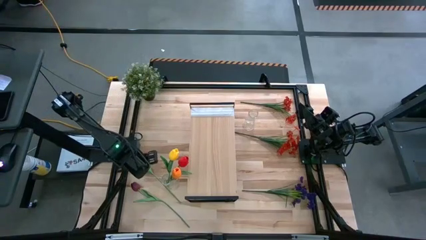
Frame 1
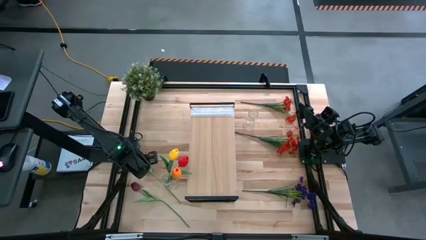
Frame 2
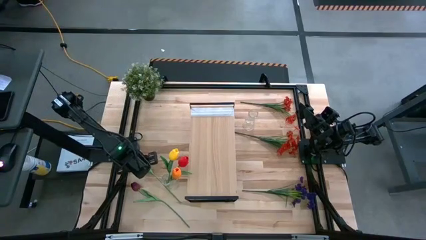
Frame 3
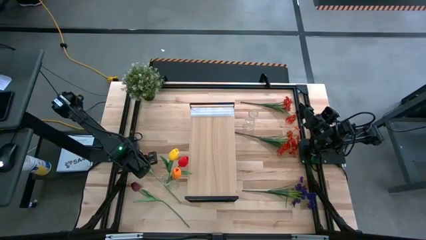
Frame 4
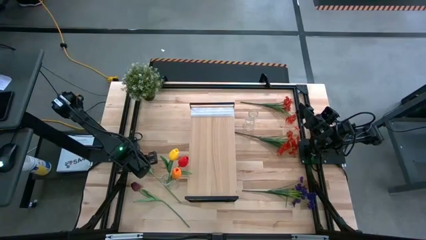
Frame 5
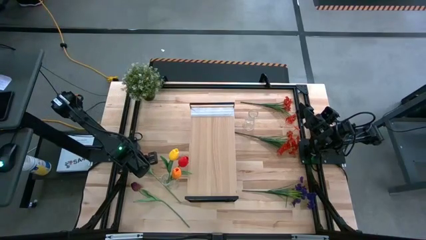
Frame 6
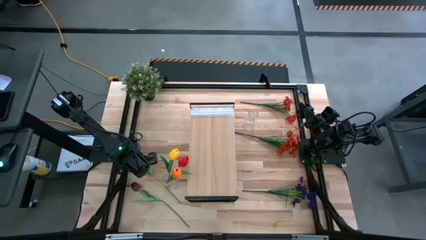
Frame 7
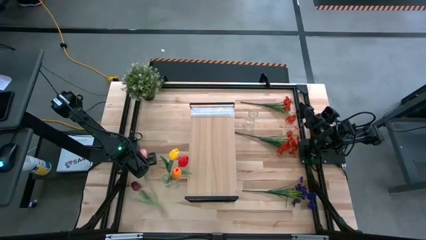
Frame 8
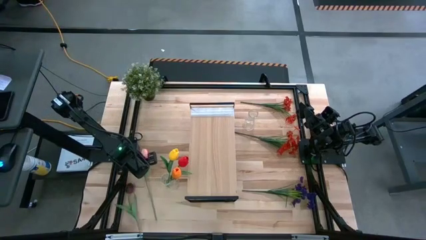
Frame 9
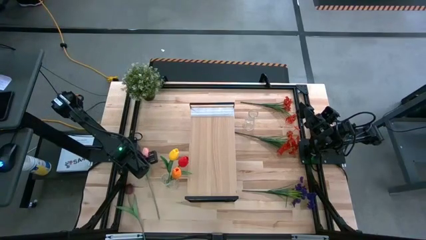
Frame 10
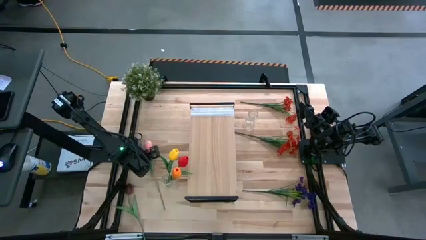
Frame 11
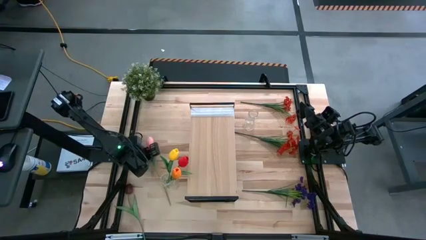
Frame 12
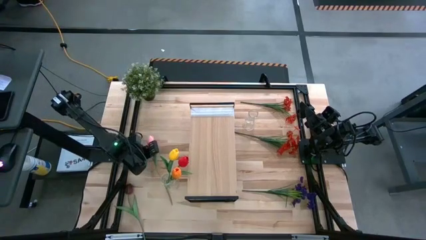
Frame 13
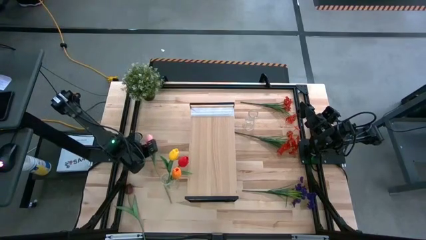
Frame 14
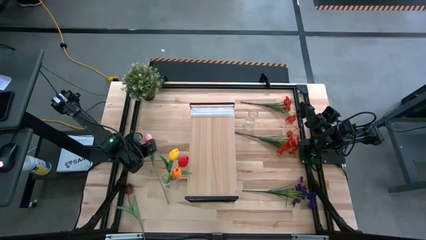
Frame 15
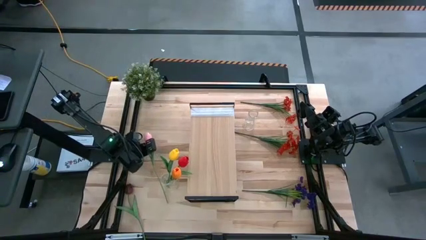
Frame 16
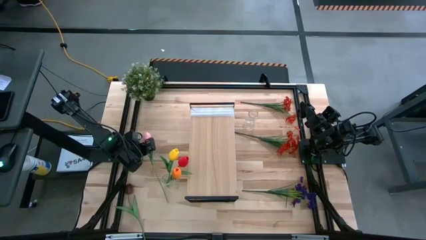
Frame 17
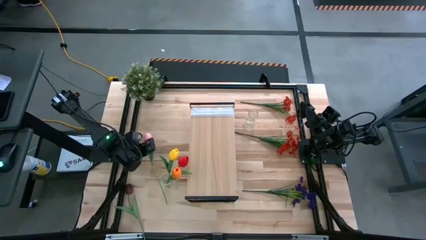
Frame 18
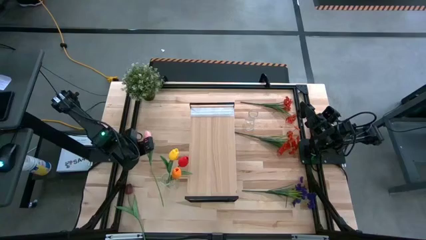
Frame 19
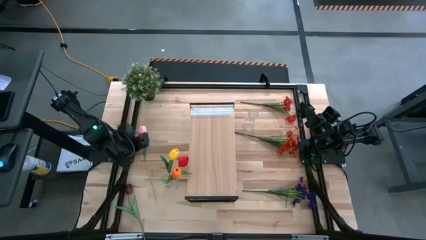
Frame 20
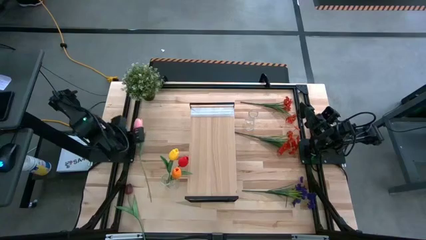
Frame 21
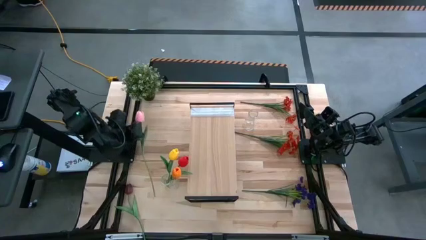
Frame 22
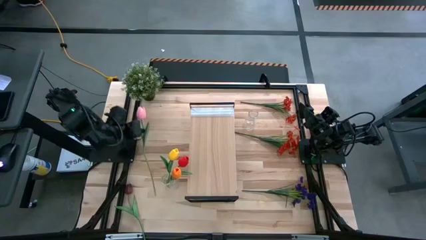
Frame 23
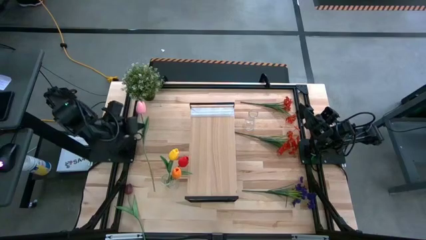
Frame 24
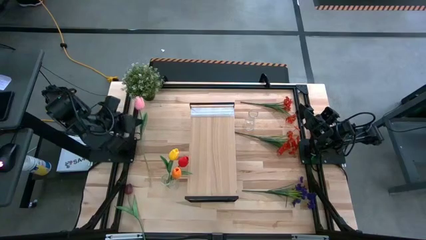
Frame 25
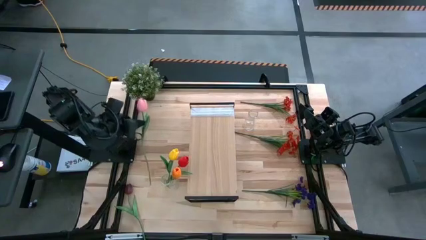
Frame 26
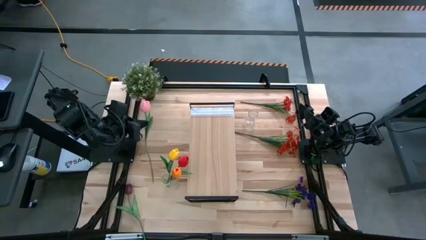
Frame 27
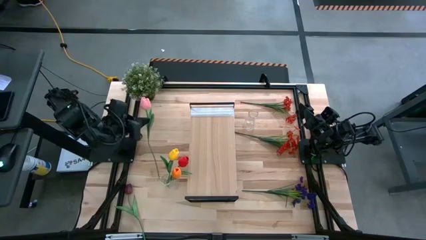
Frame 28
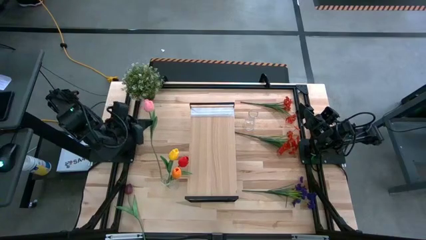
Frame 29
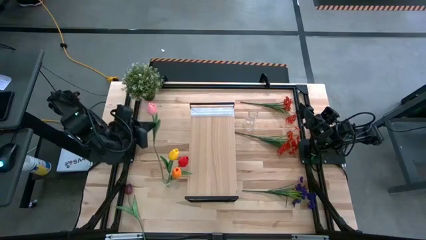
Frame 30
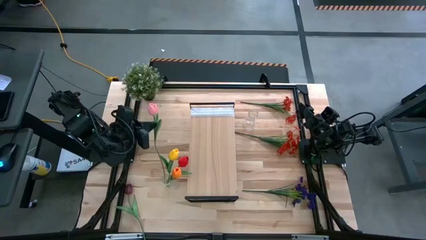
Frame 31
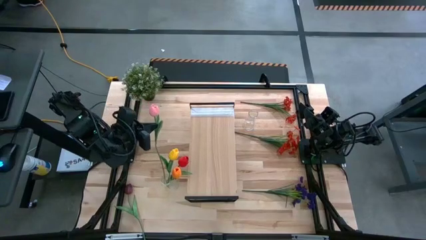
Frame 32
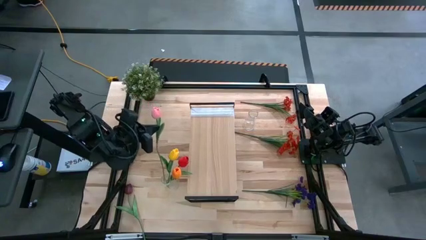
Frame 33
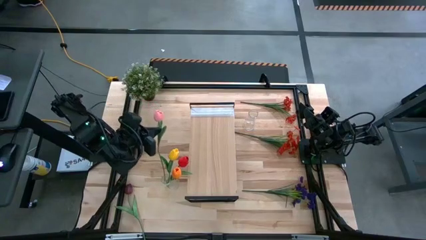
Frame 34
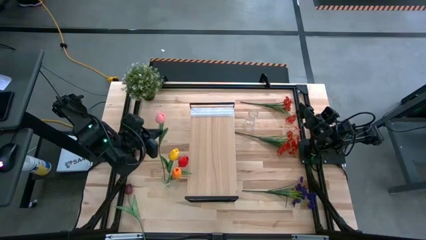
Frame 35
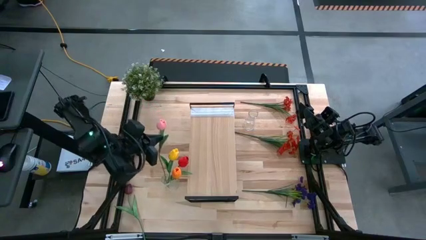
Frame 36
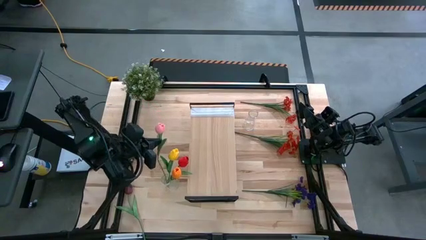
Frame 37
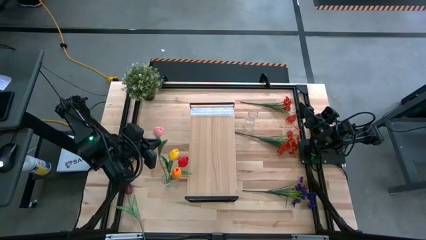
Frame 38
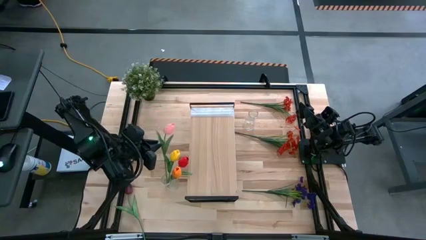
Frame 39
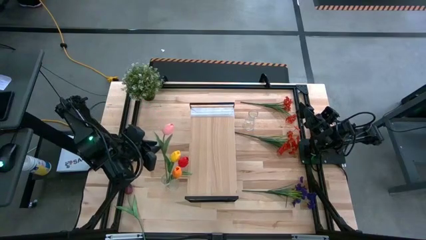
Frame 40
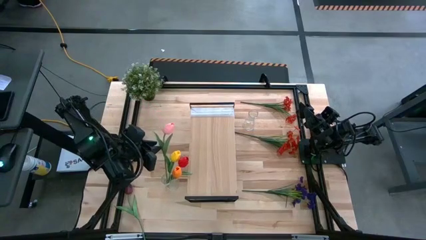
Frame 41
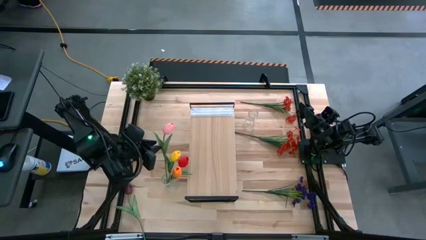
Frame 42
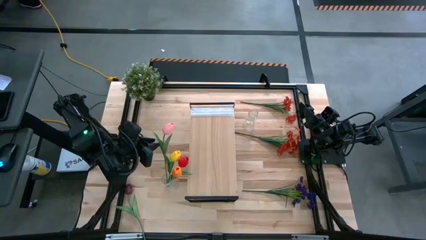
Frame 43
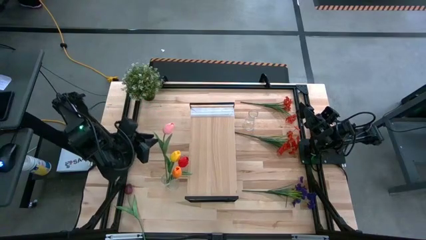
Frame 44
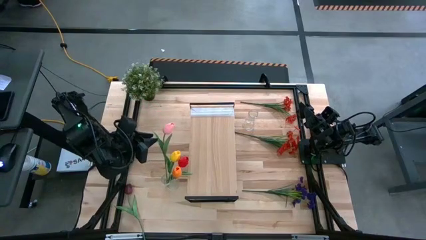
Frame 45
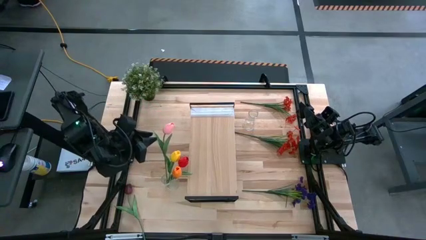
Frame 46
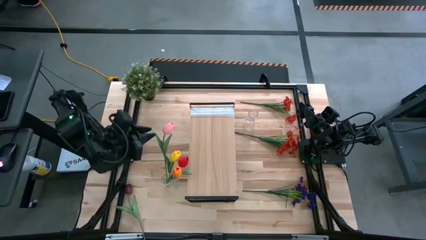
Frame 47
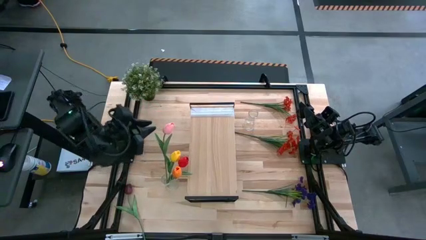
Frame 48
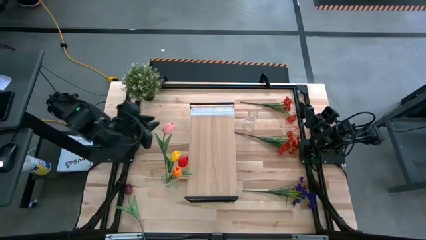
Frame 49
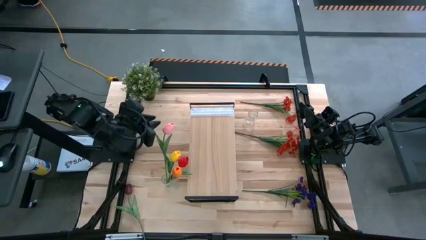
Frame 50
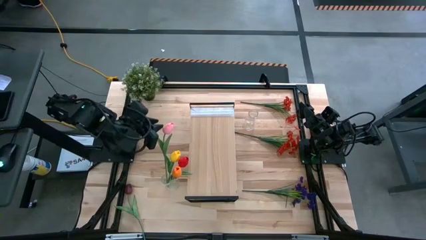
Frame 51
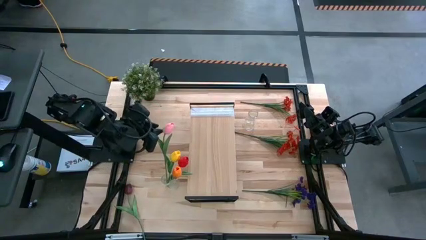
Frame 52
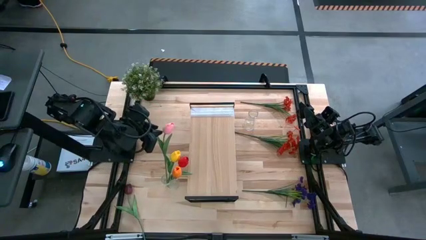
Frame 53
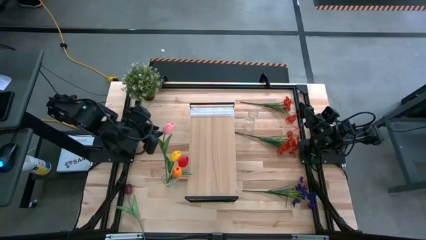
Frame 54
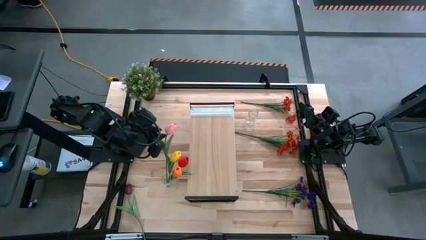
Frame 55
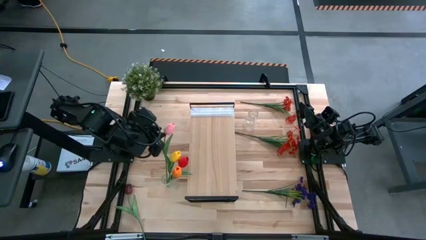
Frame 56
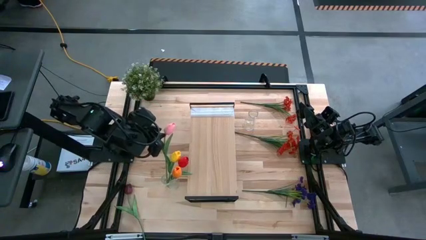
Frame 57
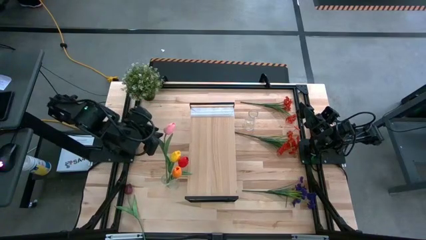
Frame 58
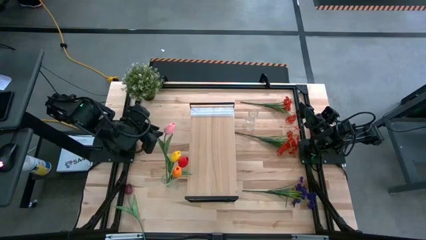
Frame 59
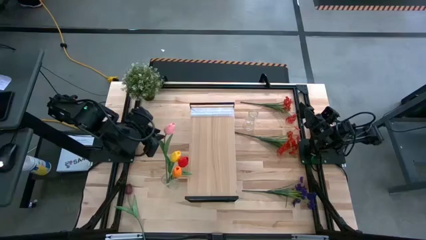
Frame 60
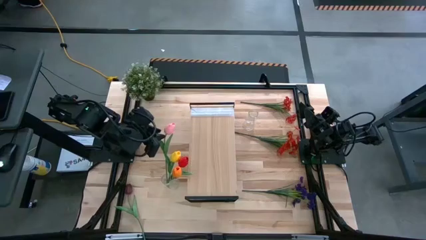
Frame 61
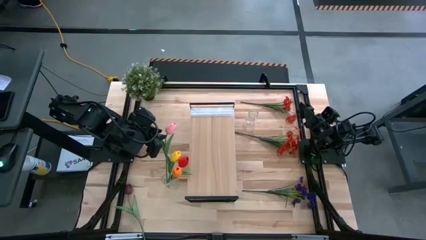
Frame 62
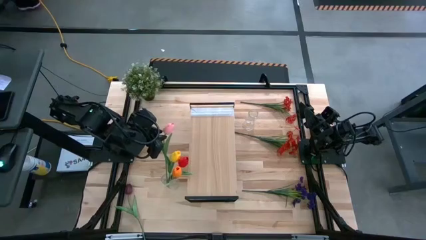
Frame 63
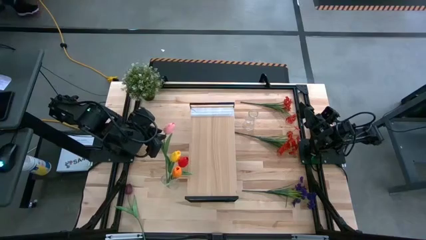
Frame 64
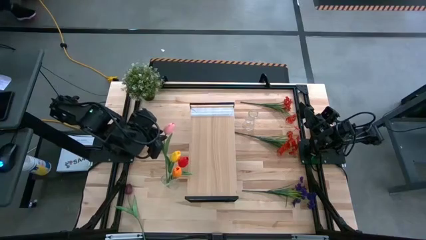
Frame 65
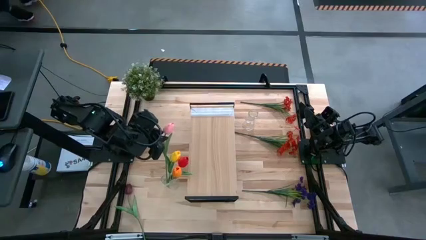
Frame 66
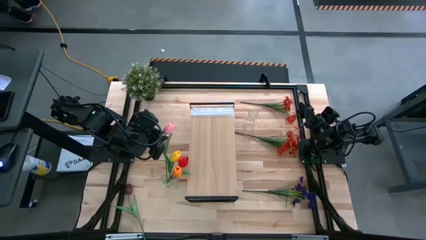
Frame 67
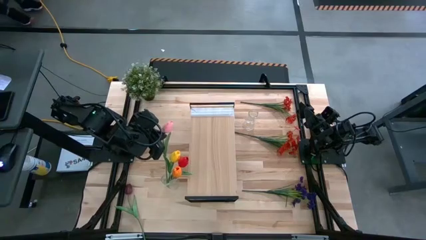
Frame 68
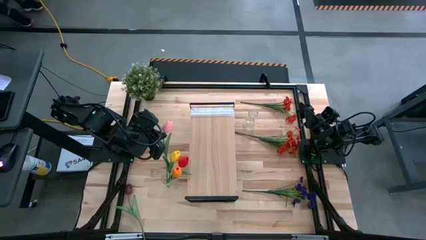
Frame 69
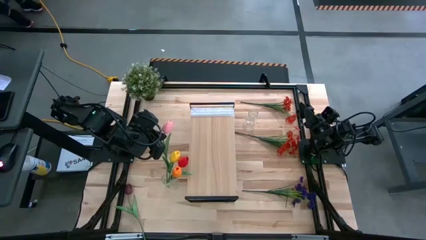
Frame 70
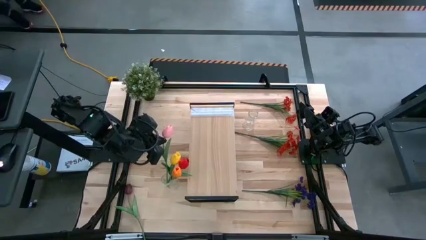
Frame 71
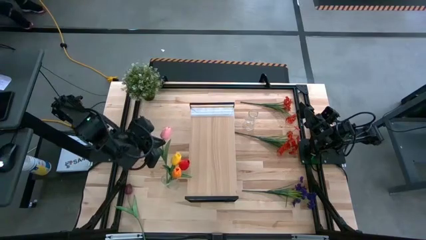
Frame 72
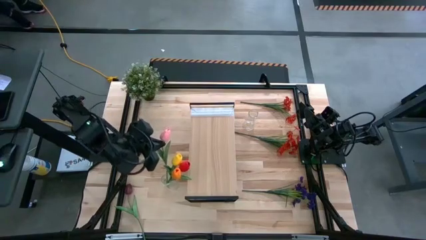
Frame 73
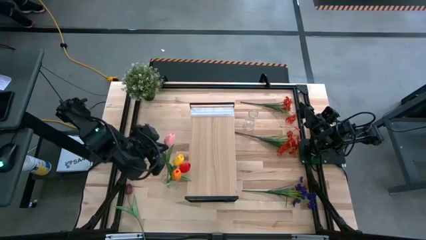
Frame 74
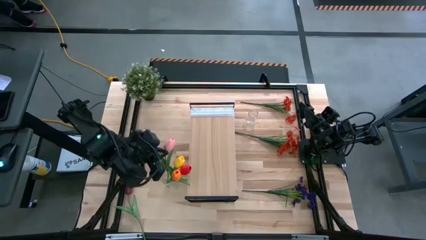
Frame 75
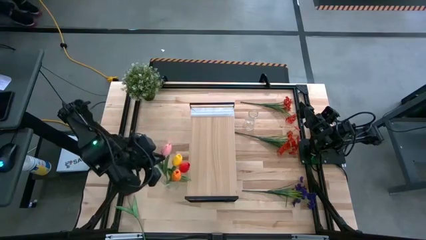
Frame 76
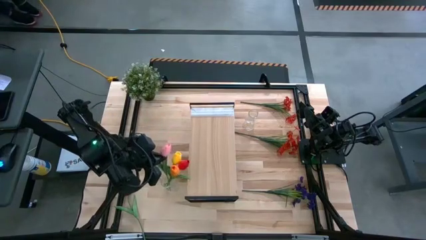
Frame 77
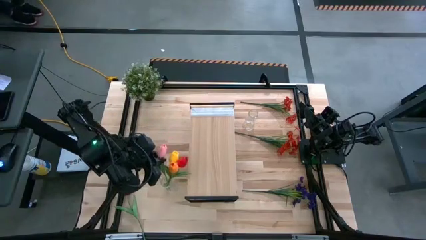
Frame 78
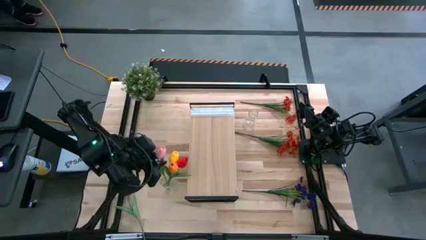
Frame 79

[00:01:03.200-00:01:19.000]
Task: Pick and place flowers into a vace then onto a shelf
Put the pink tulip into the bottom vase

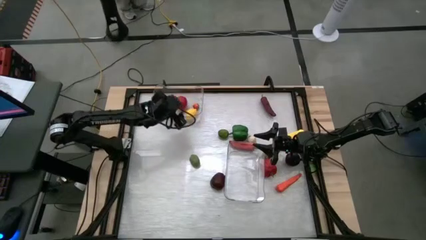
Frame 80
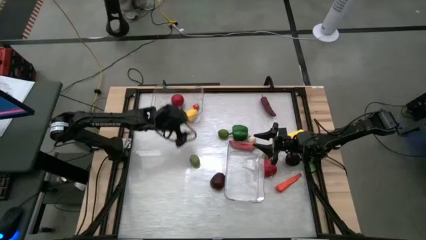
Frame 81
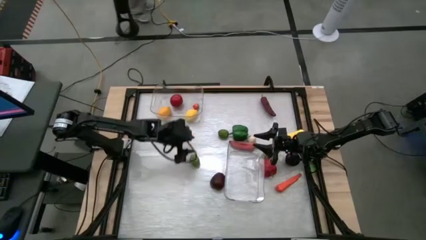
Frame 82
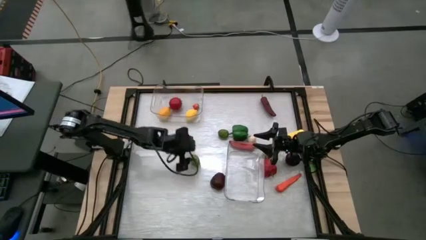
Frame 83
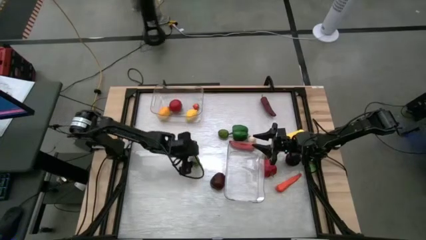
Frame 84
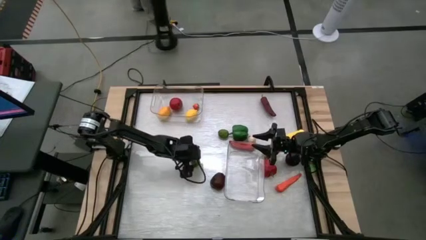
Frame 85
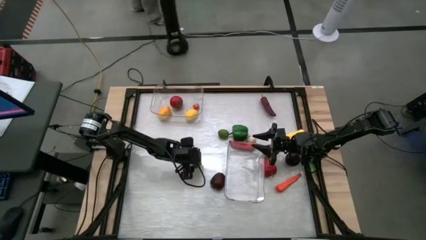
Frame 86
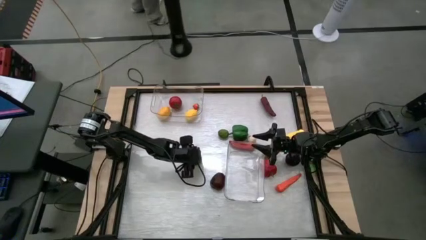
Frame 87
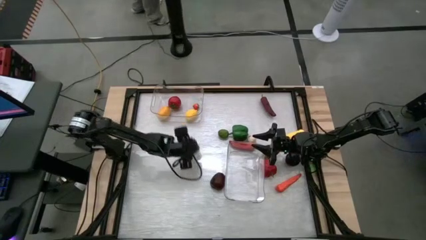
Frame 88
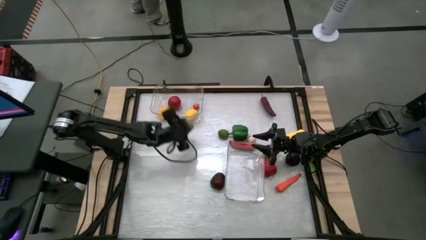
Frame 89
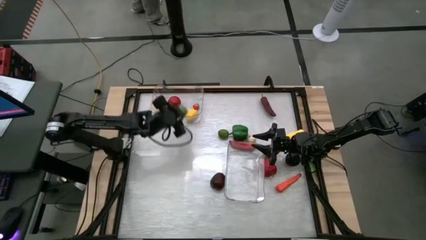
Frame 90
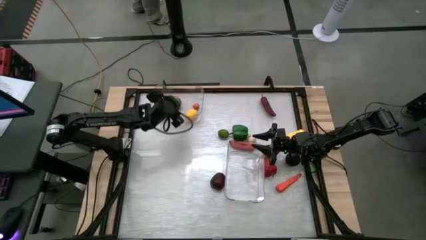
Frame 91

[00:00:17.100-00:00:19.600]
Task: Sort produce into baskets
Put the bottom green lime into the top transparent bin
